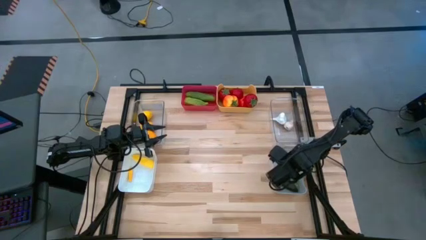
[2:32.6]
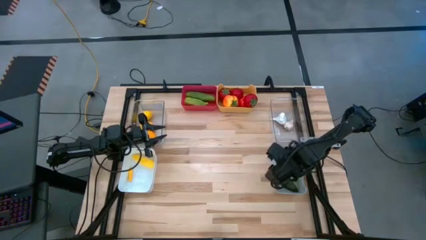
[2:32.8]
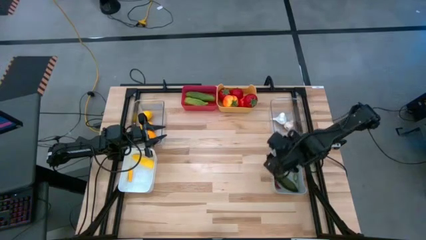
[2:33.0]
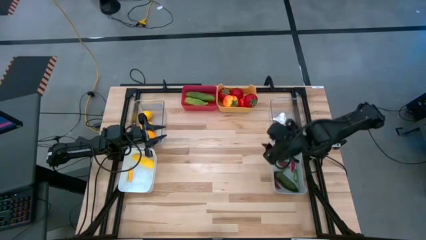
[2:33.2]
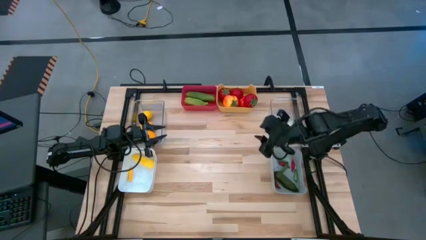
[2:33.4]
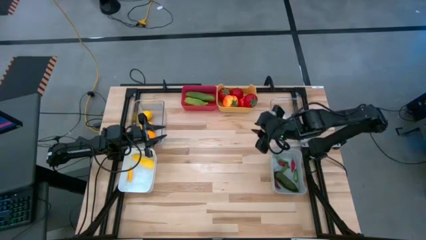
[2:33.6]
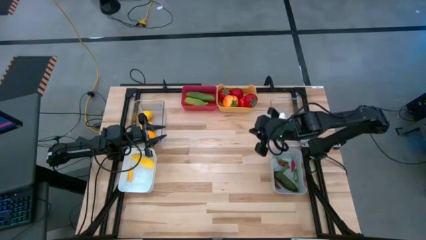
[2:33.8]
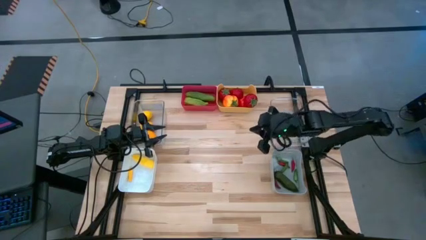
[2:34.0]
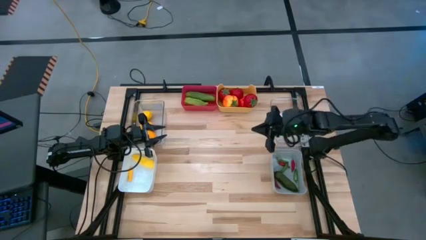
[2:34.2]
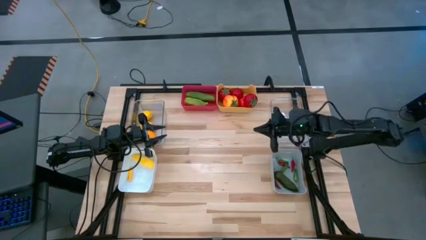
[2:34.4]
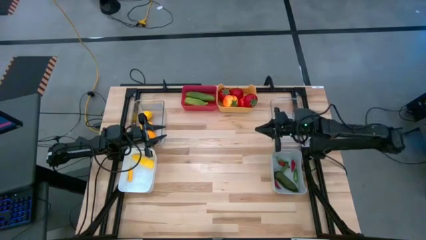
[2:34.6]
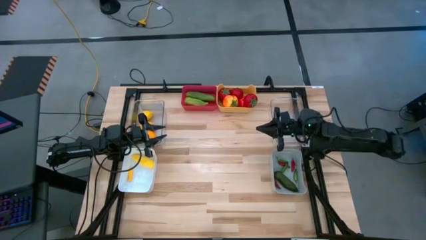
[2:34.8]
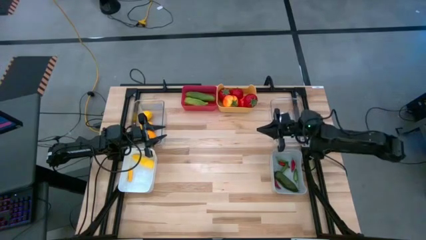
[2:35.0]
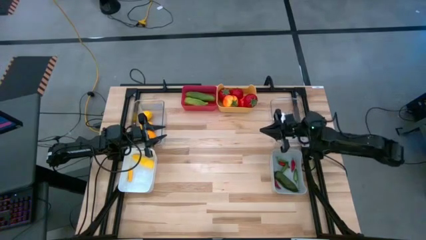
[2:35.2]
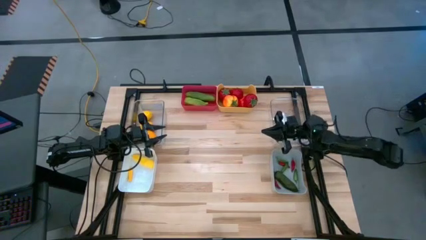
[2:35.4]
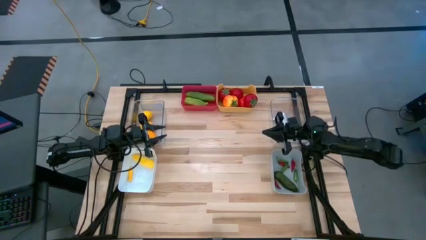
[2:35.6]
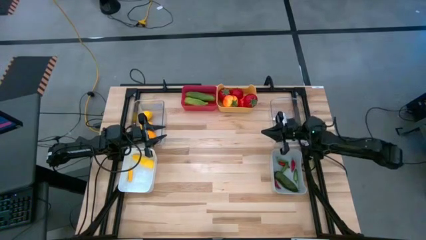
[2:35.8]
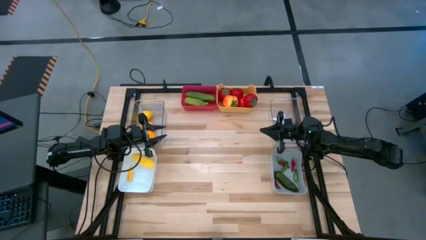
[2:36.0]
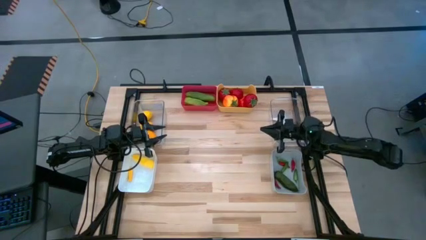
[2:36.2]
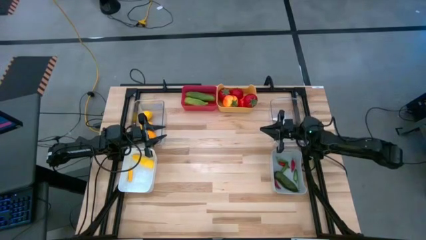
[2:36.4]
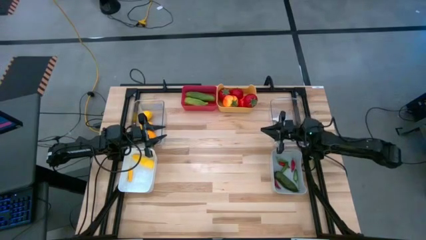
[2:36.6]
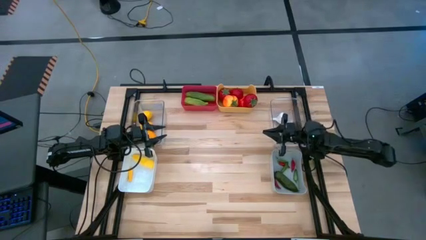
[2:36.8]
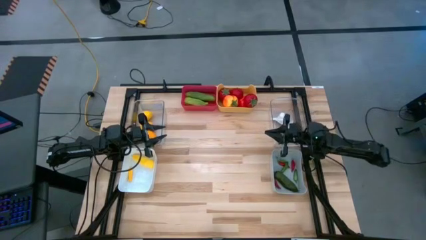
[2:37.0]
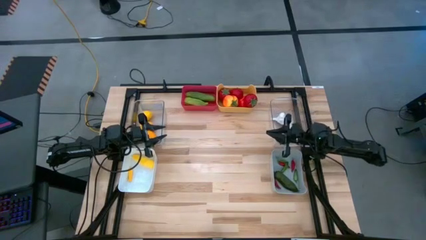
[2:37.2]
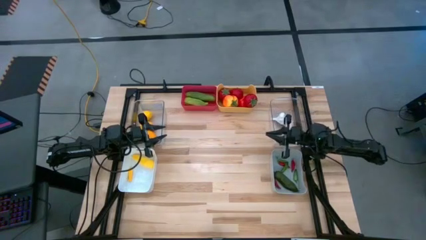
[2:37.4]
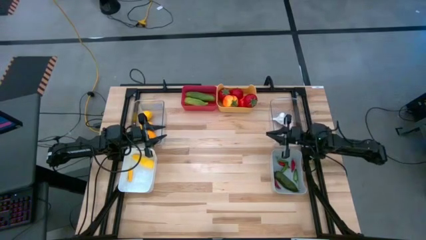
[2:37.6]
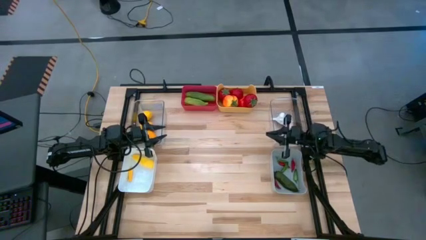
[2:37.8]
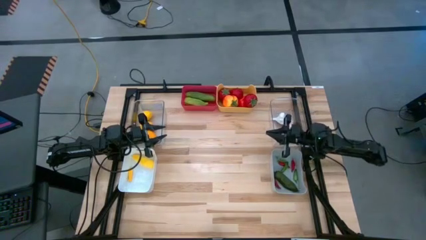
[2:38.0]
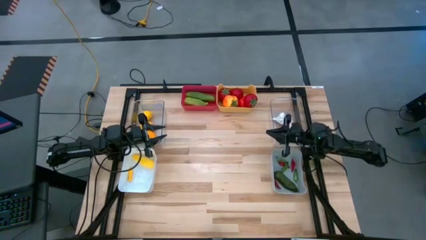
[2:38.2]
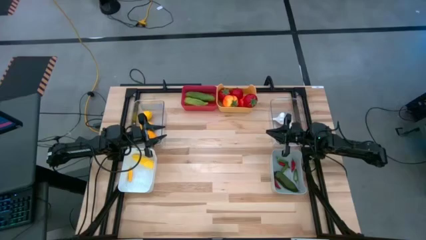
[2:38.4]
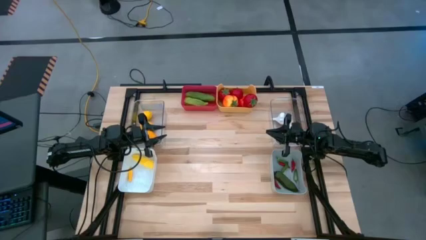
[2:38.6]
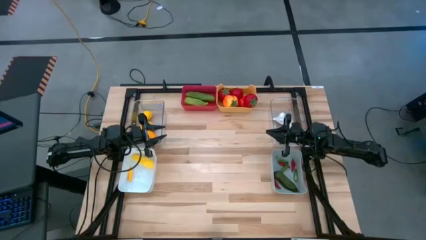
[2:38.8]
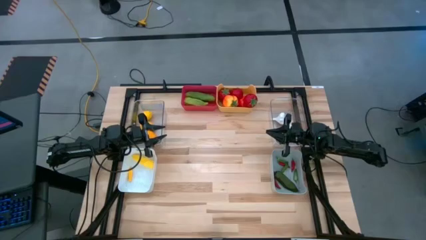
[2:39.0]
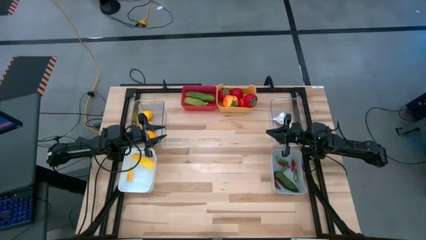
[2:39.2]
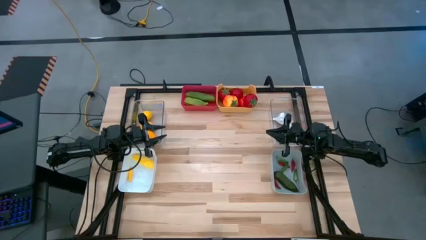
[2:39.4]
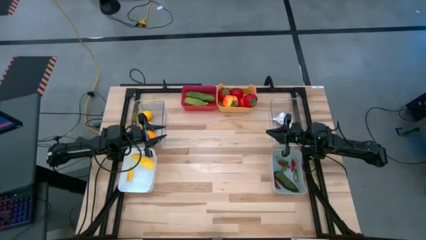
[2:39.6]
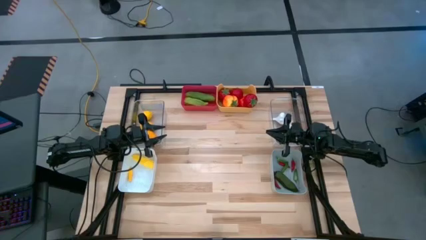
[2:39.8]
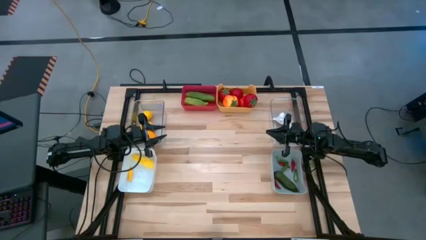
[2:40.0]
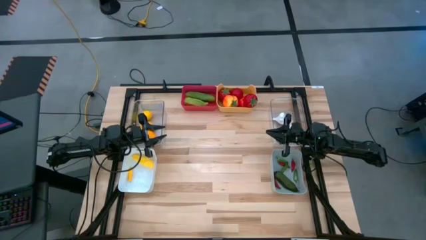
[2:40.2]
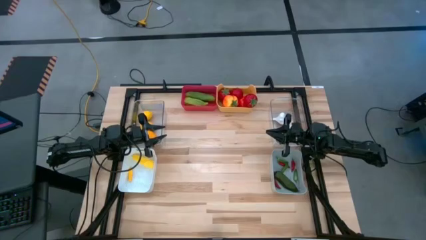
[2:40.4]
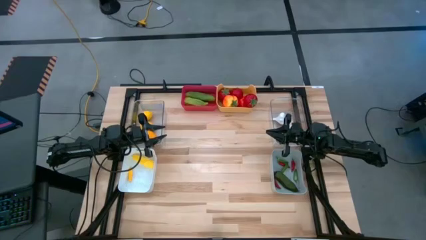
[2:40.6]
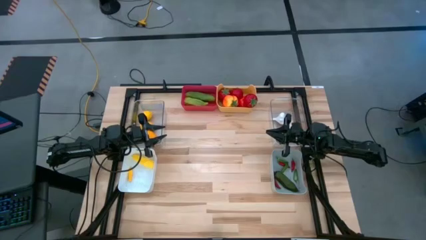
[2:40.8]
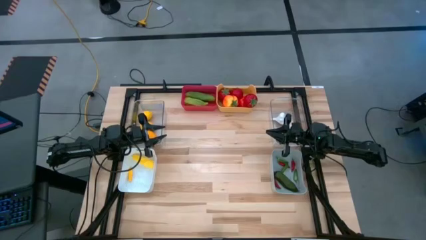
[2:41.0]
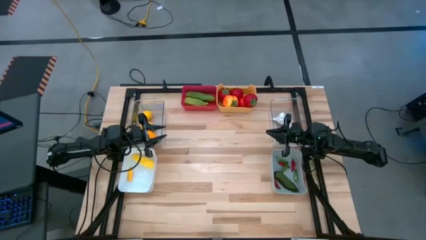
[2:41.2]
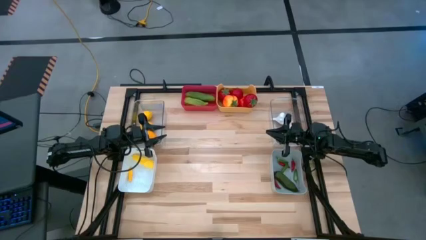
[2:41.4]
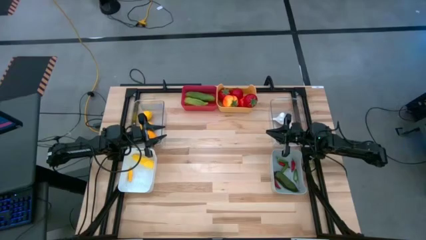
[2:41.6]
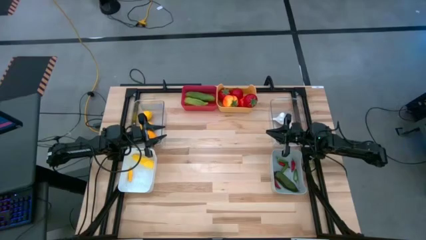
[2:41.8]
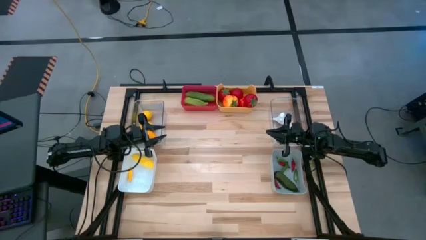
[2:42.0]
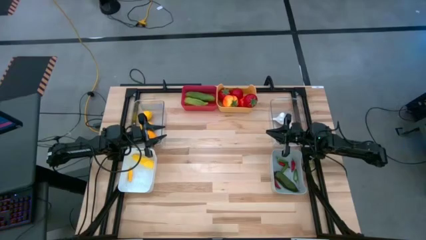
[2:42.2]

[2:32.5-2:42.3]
Task: Sort produce into baskets
Return to Home Position

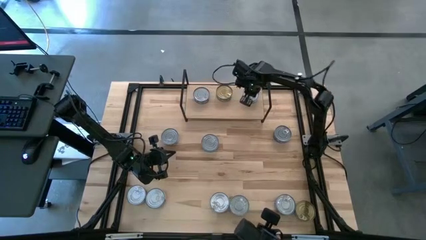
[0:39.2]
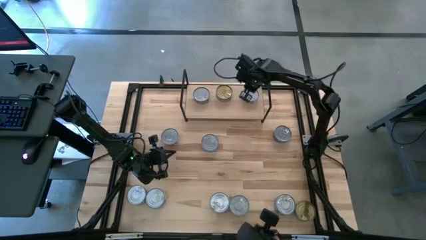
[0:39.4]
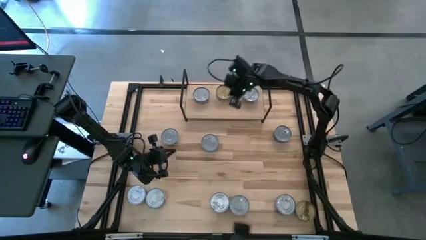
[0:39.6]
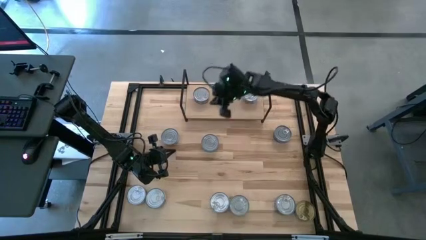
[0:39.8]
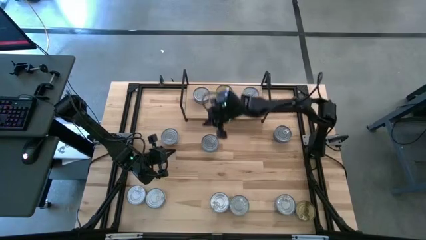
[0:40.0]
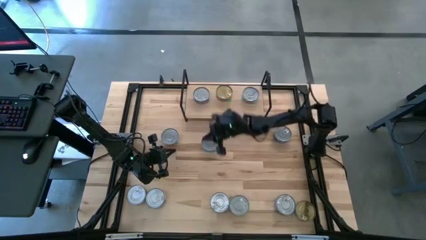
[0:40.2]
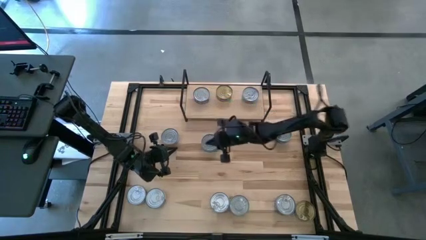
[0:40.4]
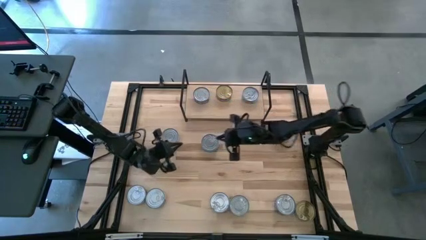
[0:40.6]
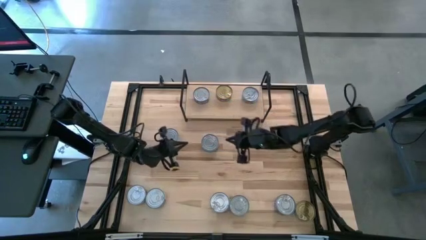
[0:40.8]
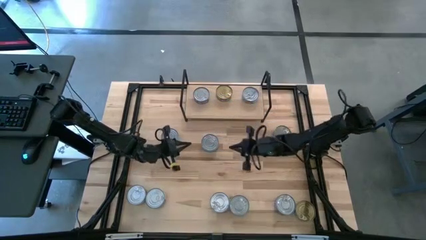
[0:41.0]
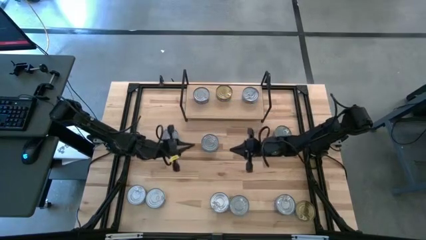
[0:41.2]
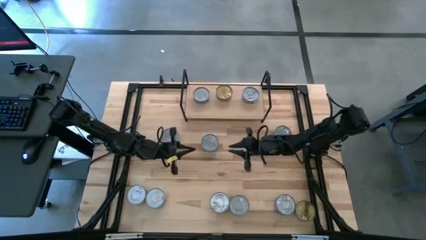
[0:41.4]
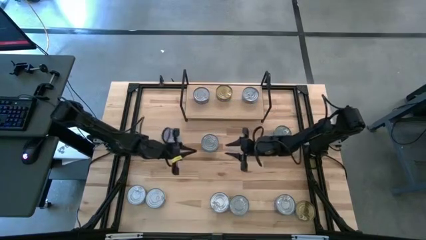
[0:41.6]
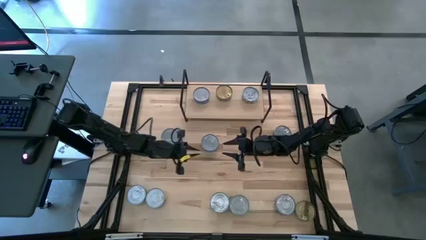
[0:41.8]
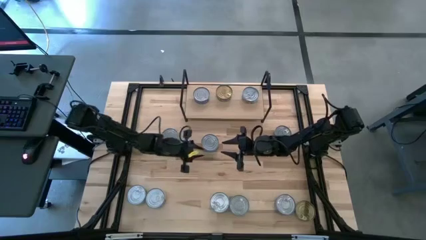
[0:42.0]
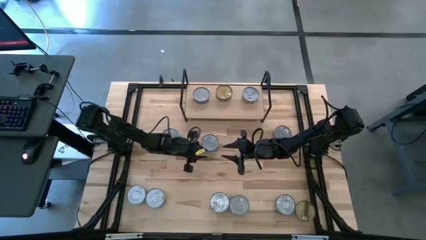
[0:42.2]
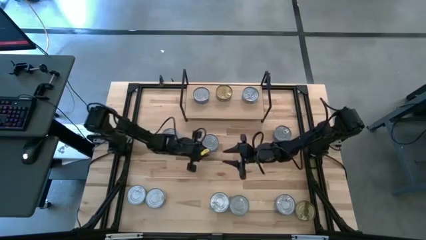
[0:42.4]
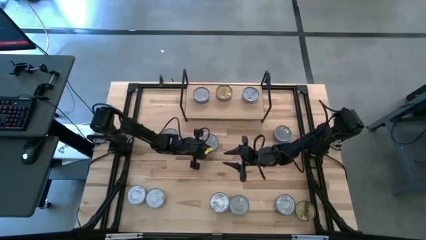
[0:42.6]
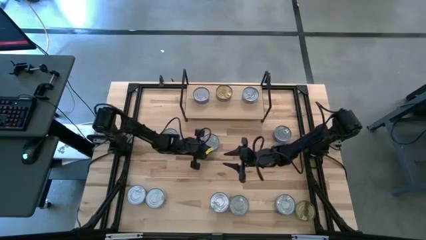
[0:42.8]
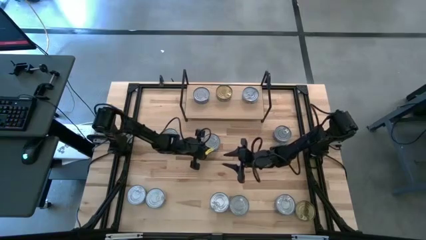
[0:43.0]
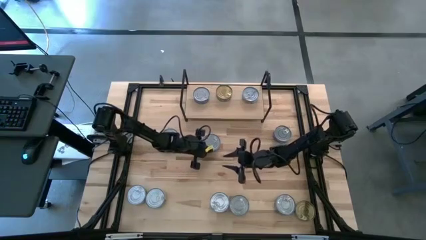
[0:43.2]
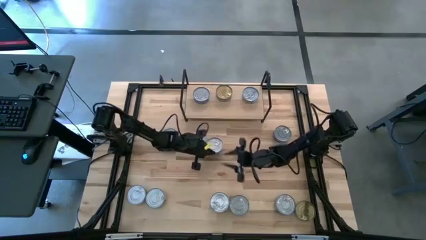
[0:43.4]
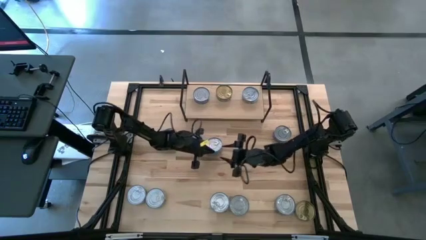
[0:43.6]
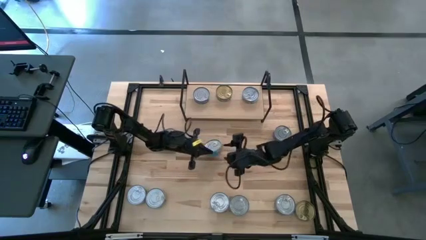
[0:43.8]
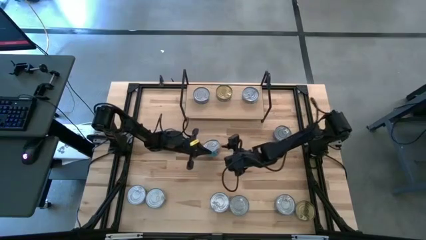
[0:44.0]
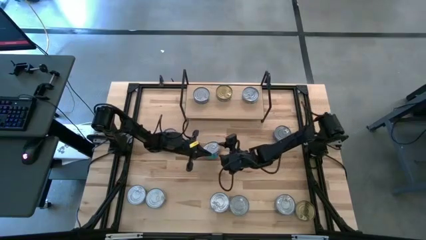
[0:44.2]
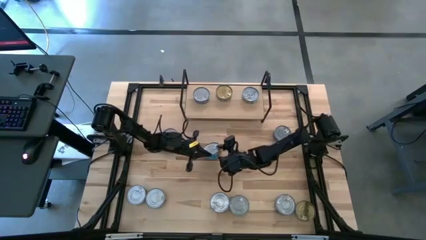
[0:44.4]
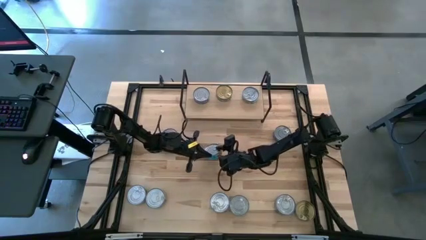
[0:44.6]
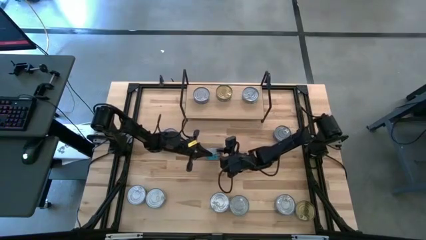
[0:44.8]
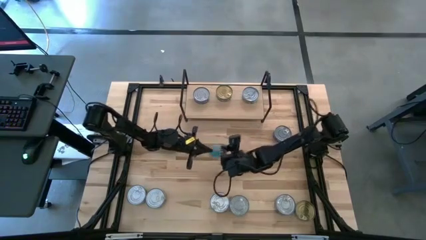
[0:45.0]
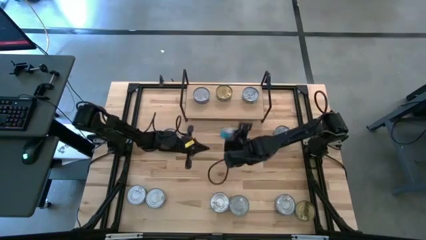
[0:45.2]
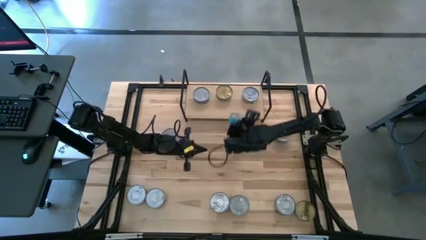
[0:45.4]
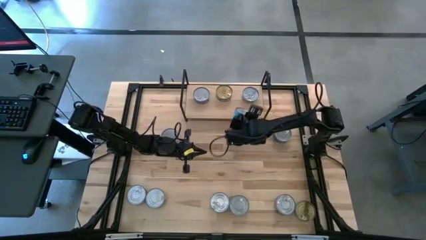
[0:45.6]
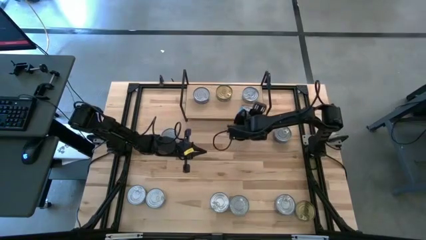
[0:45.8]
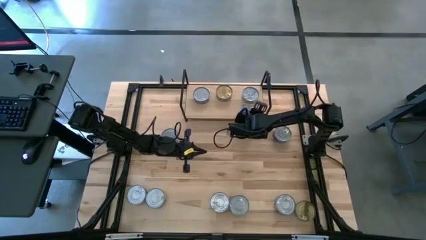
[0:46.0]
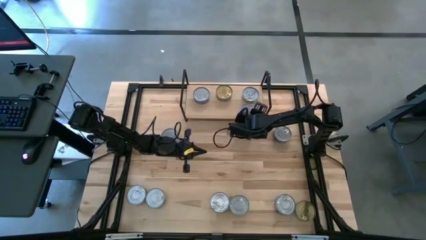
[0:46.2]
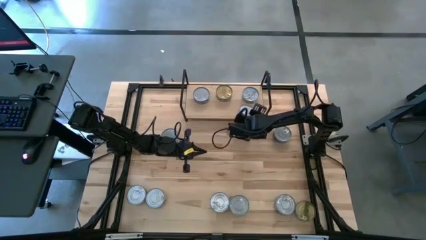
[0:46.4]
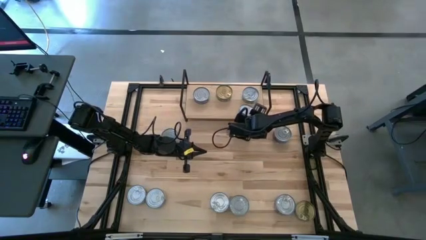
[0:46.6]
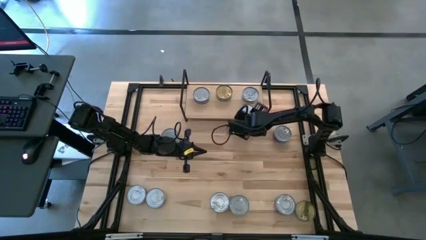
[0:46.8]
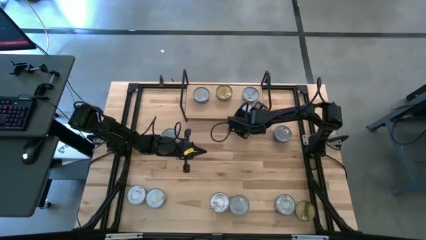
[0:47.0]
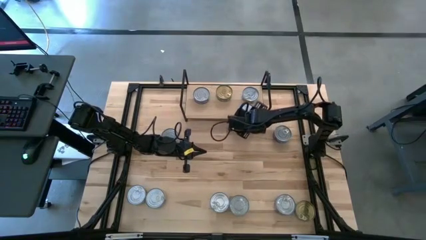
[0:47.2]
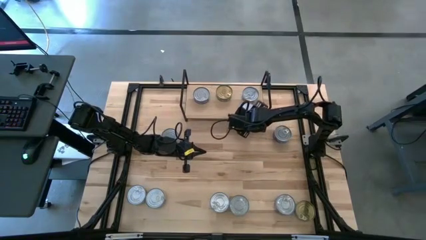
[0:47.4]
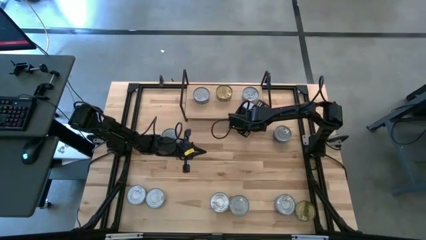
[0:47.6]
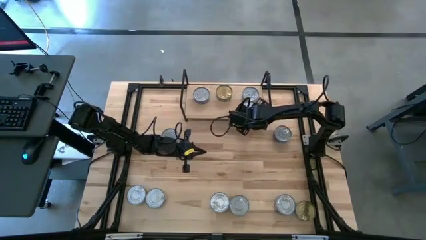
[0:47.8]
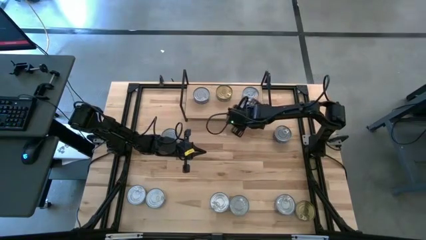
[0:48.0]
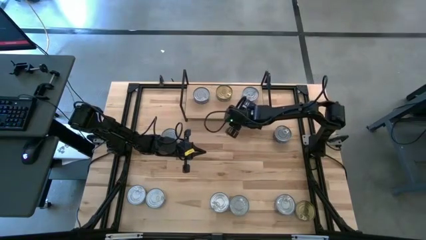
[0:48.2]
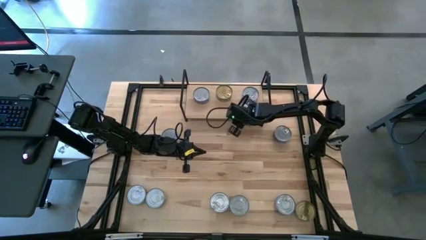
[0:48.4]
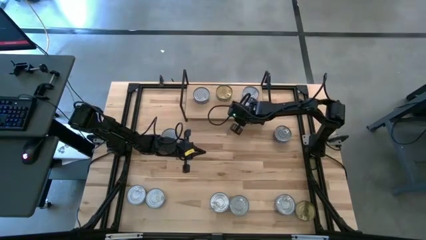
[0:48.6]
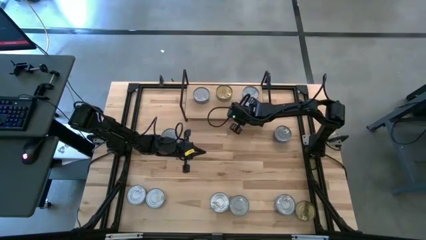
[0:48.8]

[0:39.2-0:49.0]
Task: Stack canned seafood by type on shelf
Put the top right yellow-blue tuna can on the shelf aligned with the other yellow-blue tuna can
